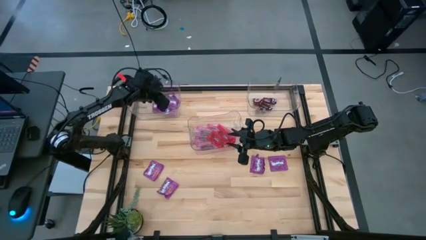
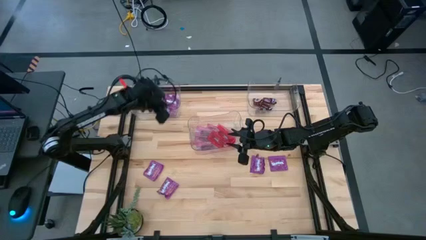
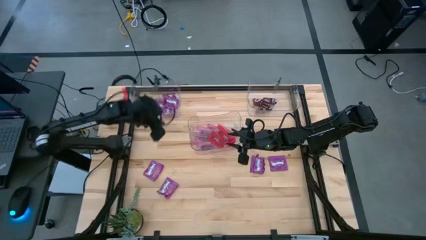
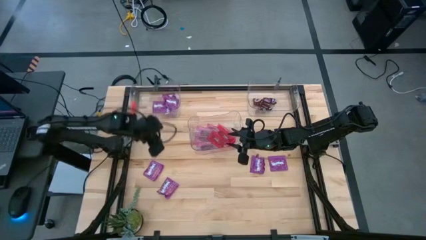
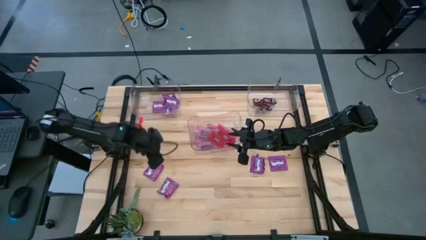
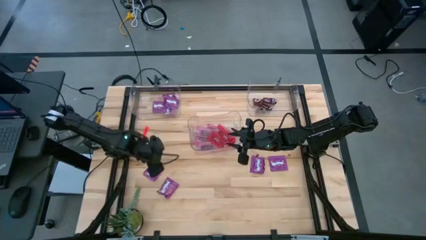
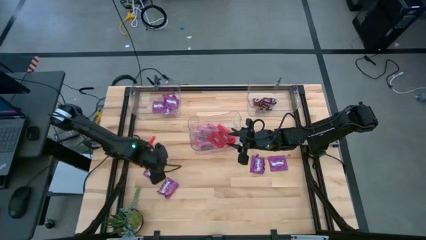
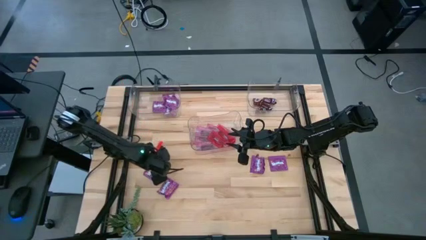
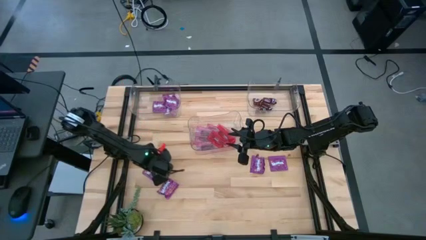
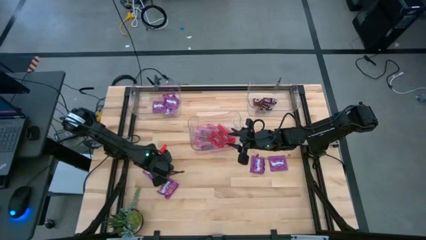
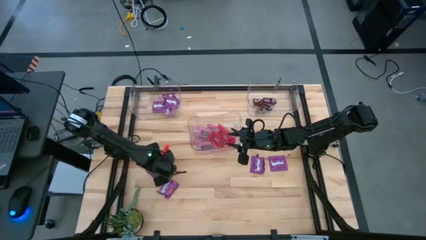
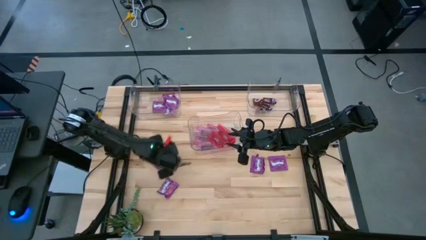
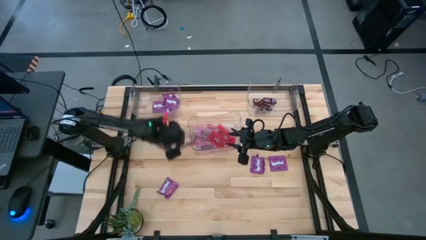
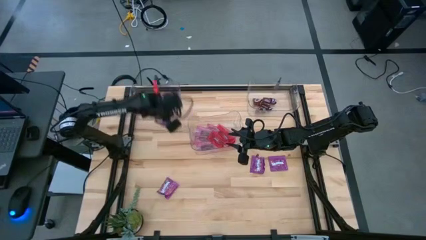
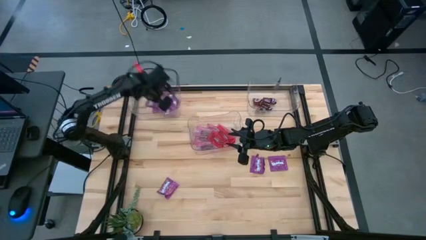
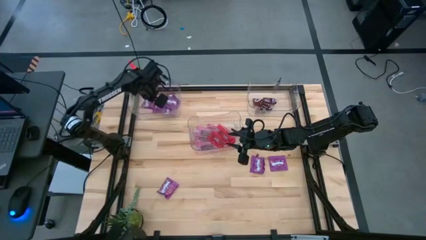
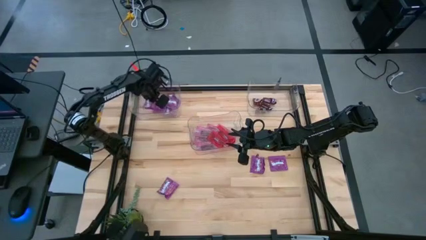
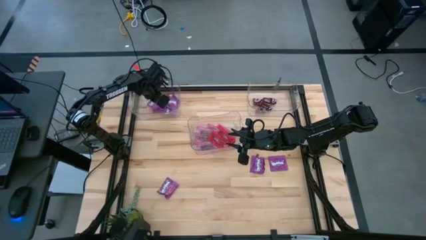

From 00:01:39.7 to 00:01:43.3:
Task: Sort candy
Put the violet candy pack into the top left transparent bin

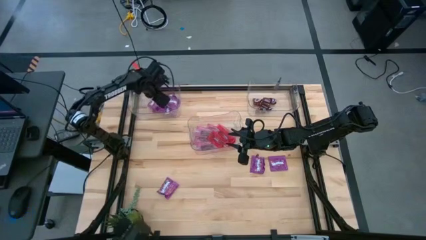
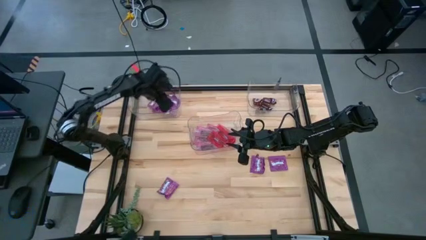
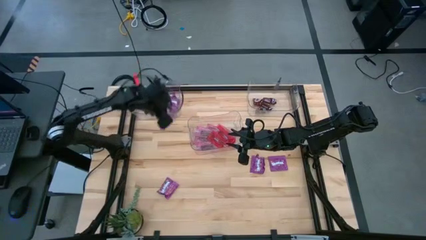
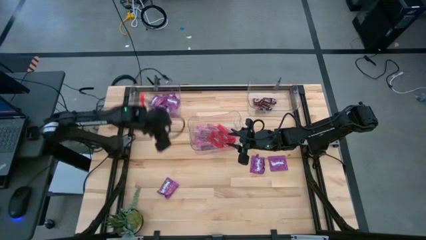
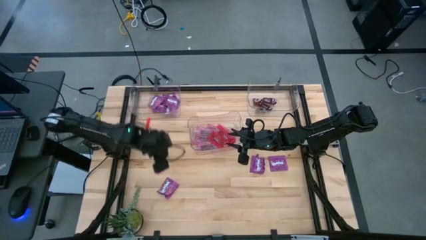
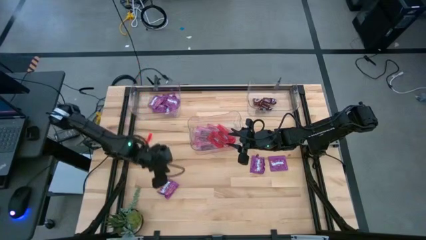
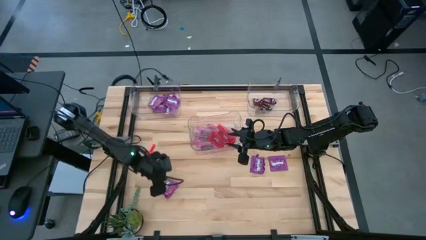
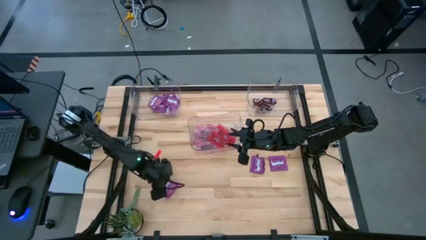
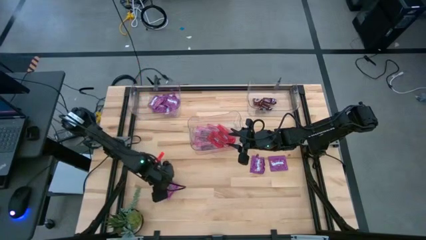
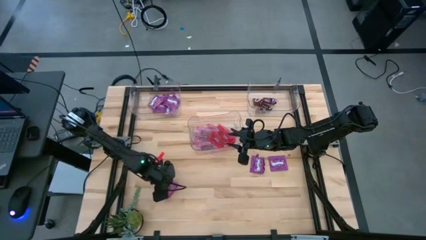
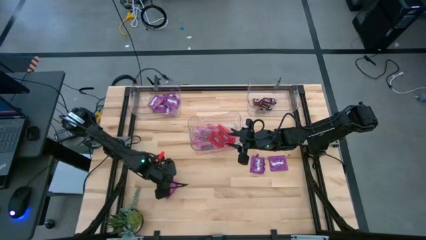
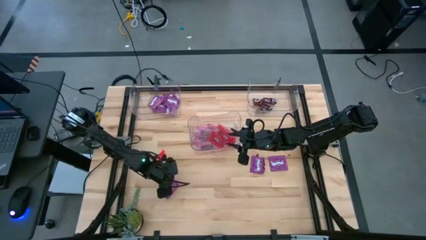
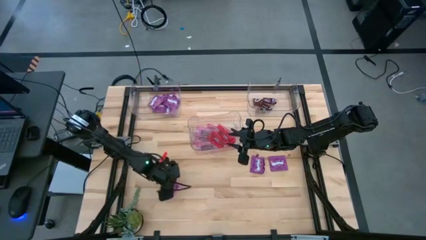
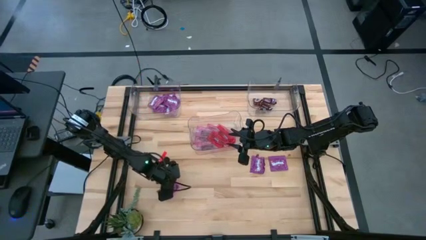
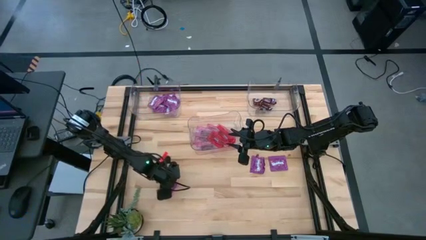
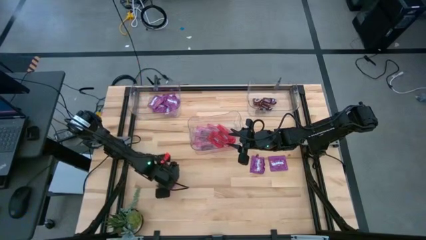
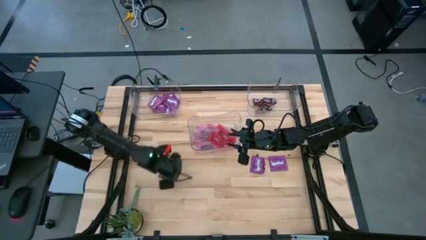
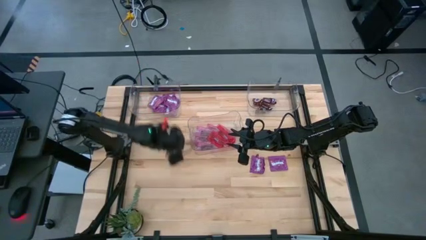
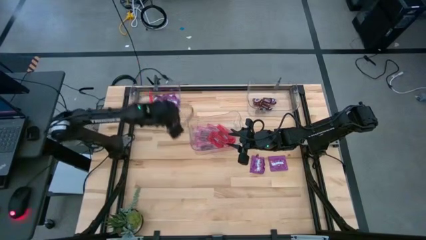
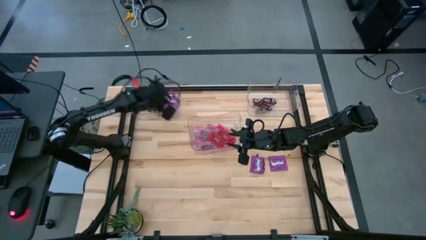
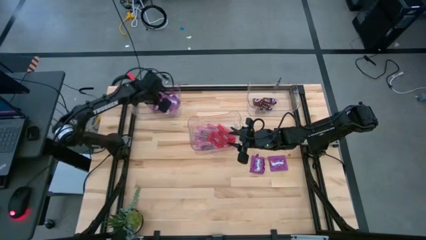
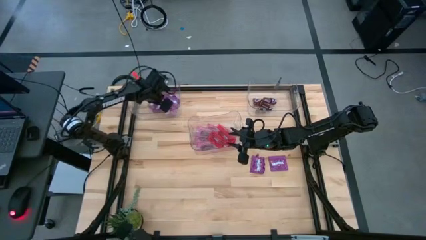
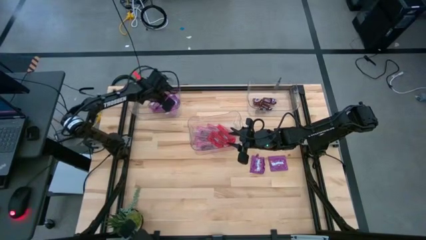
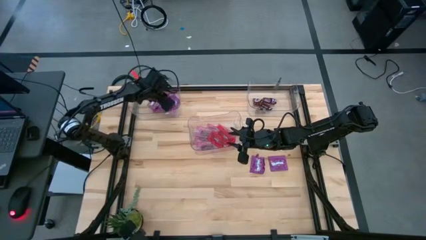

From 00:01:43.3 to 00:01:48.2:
Put the violet candy pack into the top left transparent bin

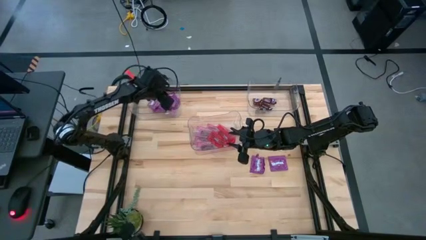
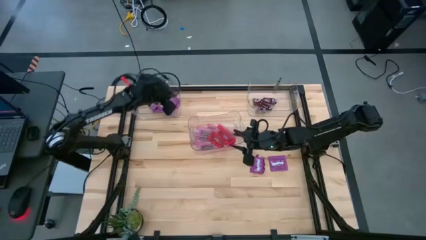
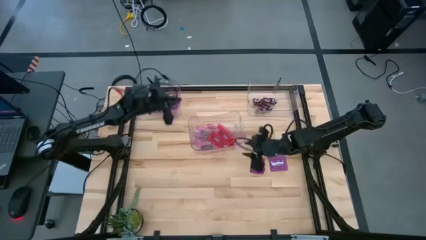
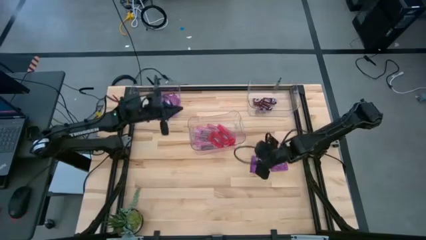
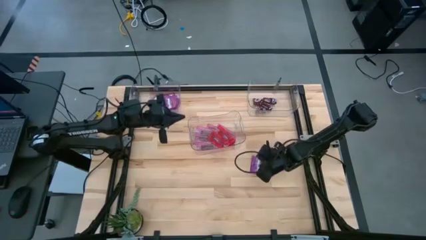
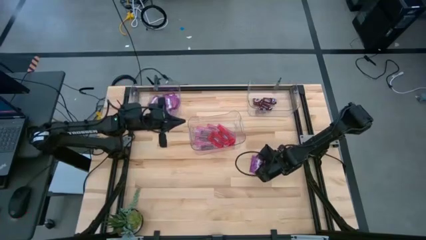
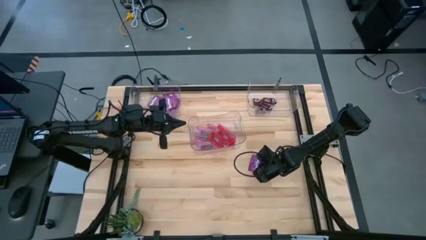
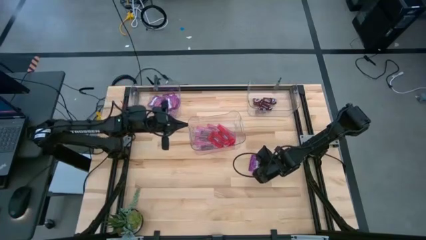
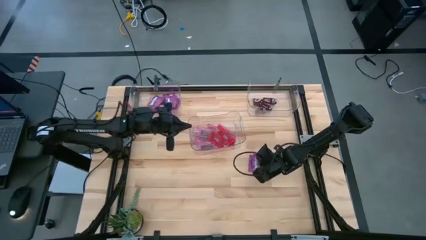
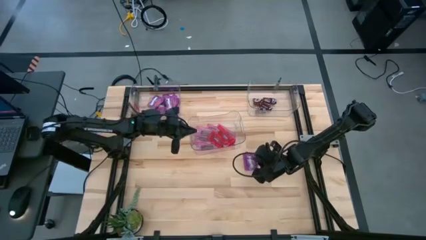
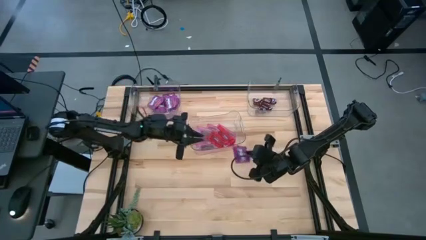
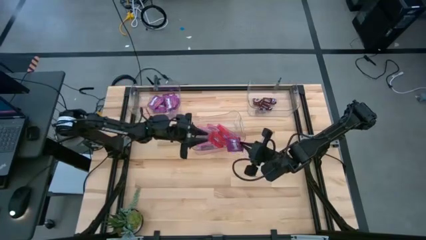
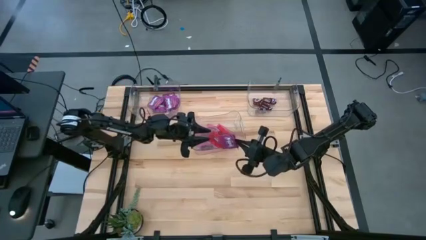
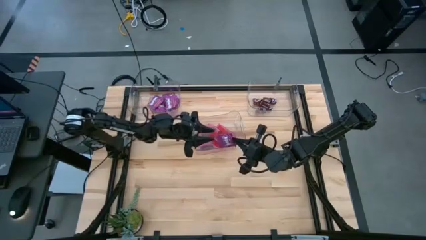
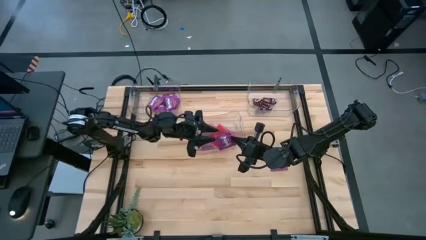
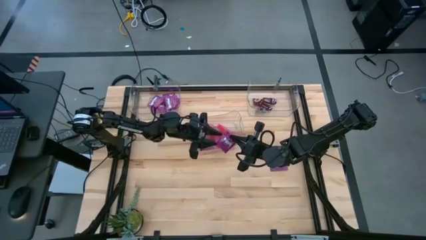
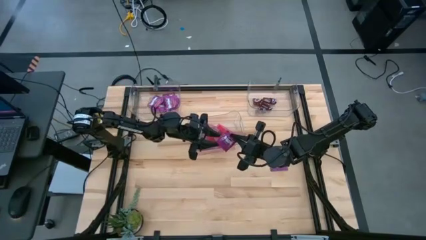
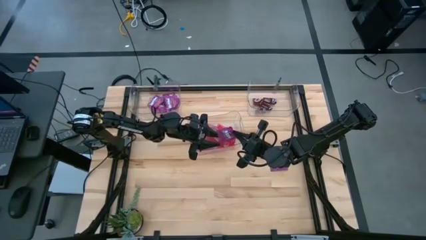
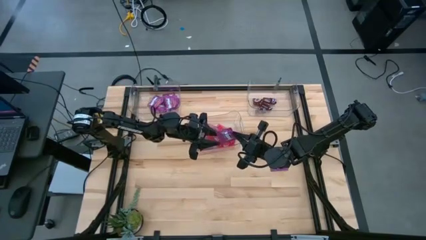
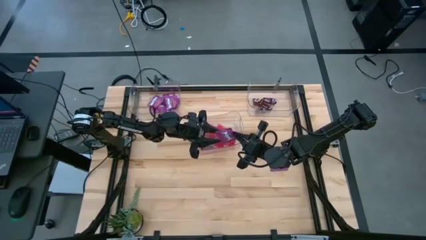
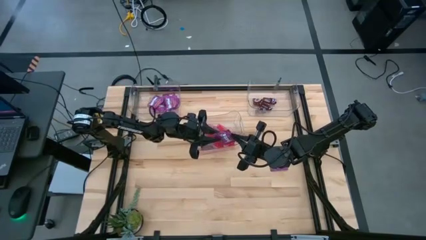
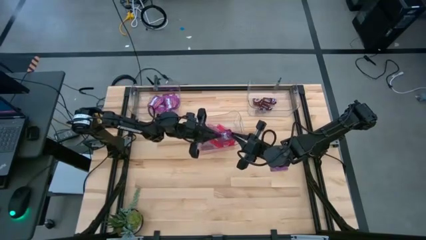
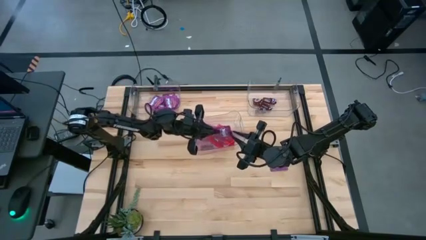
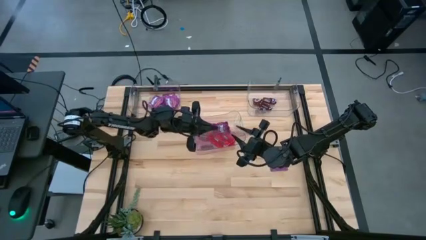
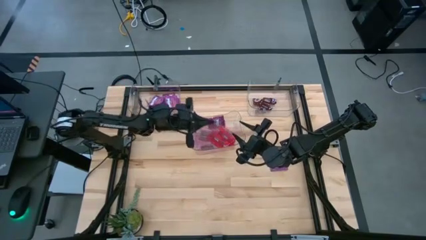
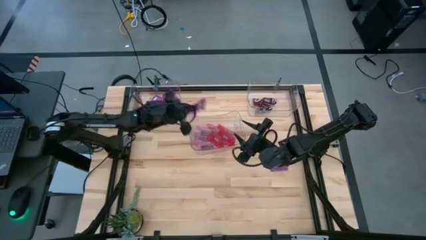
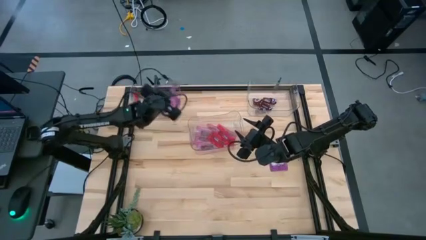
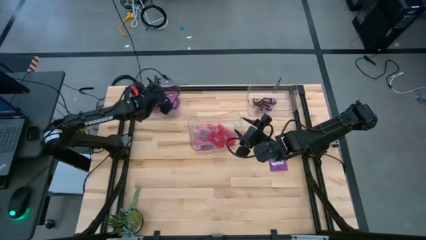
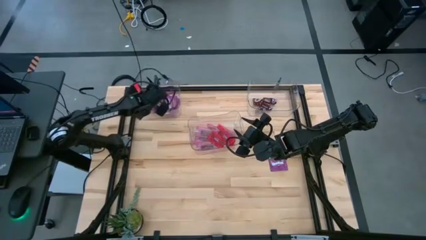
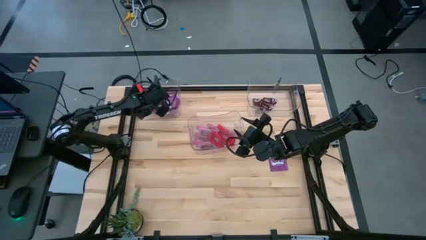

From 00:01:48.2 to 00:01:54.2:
Put the violet candy pack into the top left transparent bin

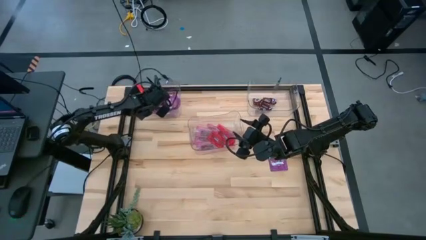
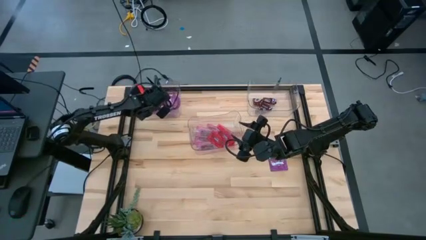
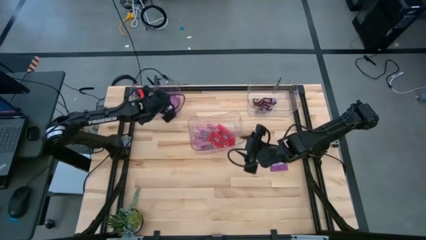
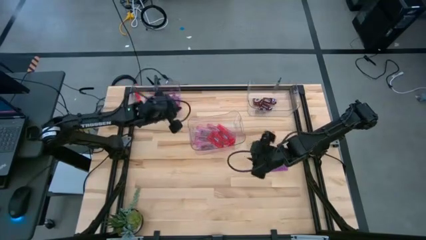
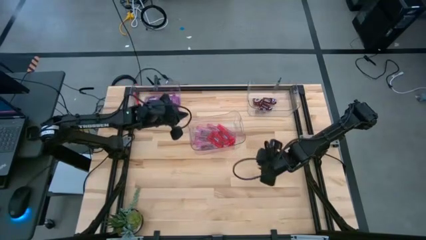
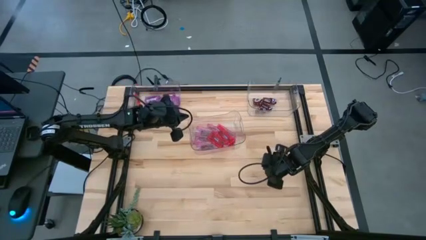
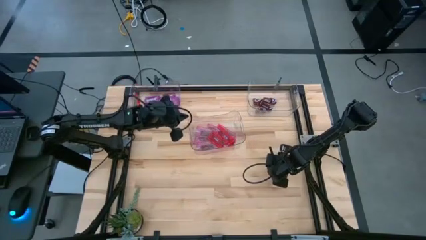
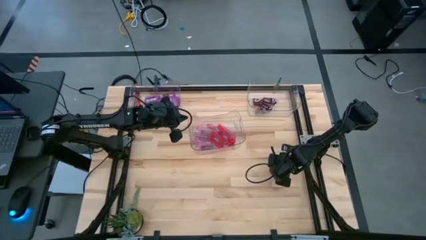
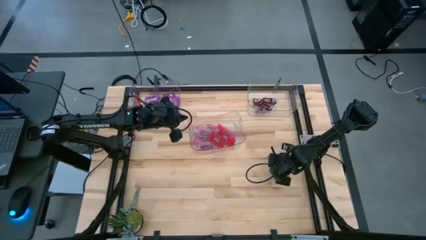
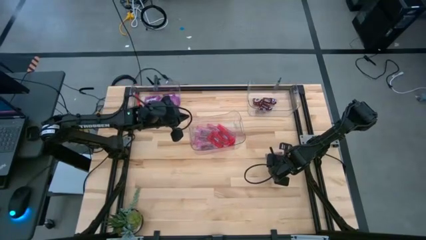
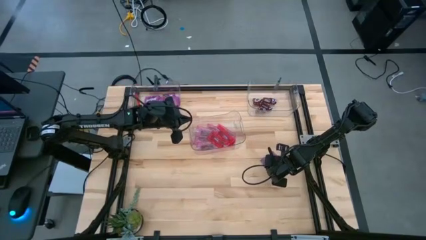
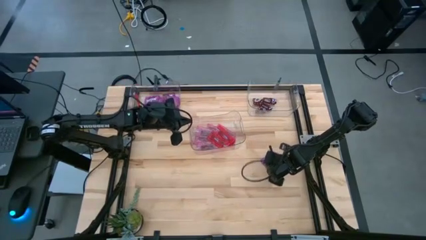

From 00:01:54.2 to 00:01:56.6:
Put the violet candy pack into the top left transparent bin
